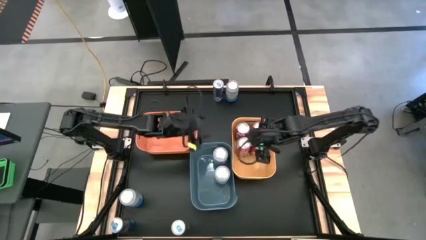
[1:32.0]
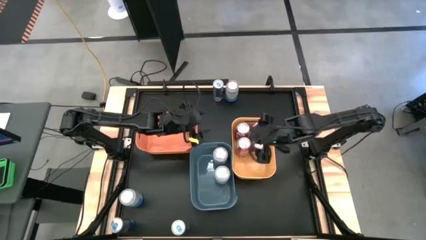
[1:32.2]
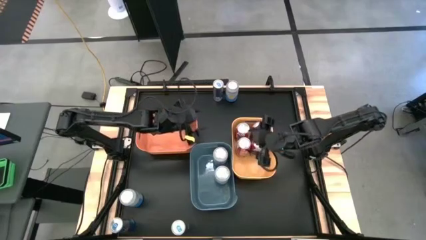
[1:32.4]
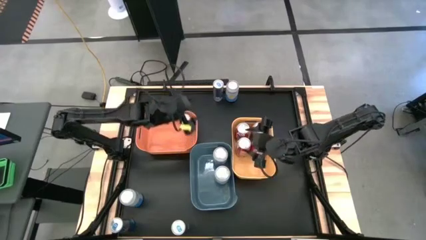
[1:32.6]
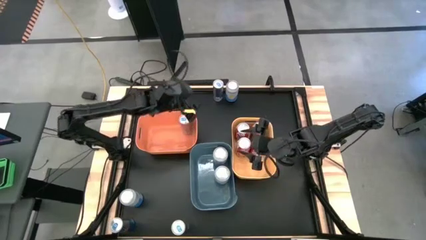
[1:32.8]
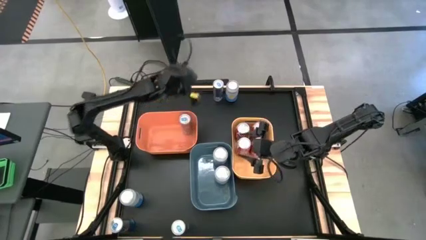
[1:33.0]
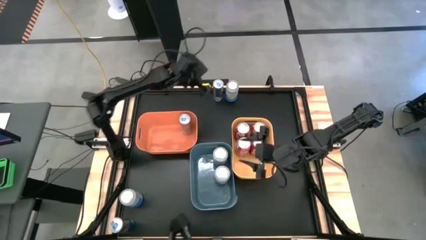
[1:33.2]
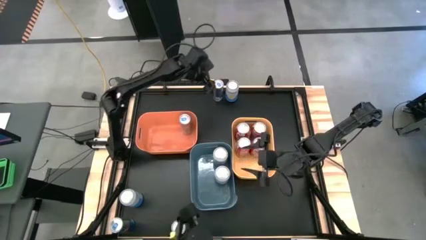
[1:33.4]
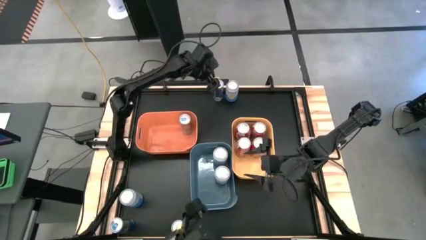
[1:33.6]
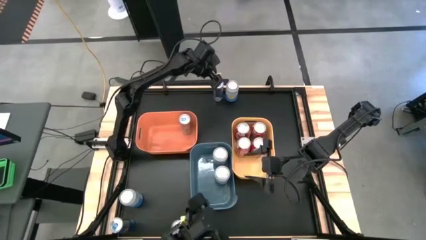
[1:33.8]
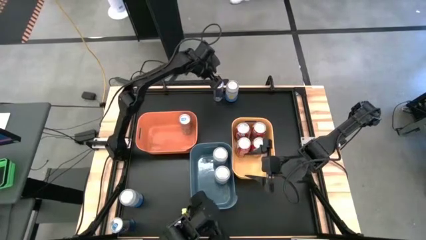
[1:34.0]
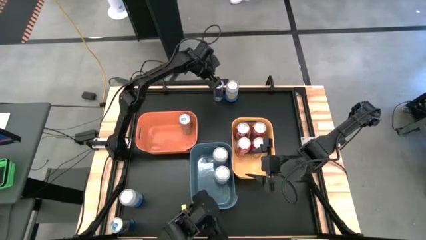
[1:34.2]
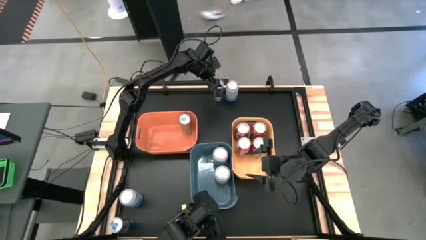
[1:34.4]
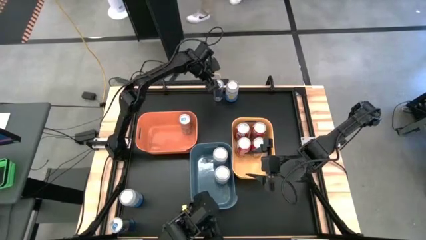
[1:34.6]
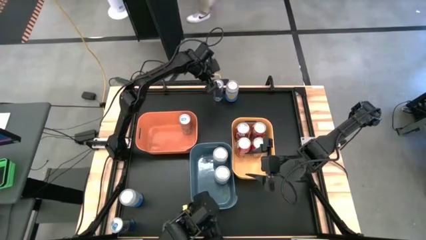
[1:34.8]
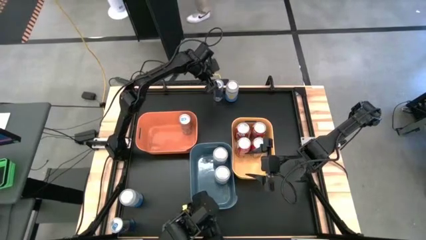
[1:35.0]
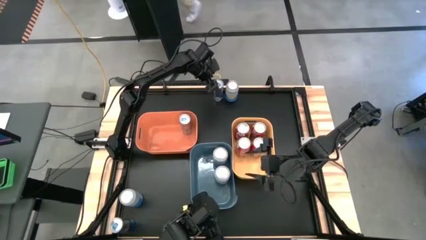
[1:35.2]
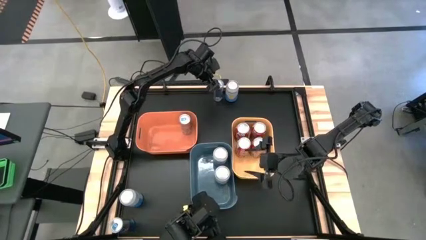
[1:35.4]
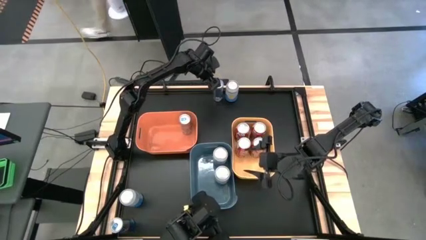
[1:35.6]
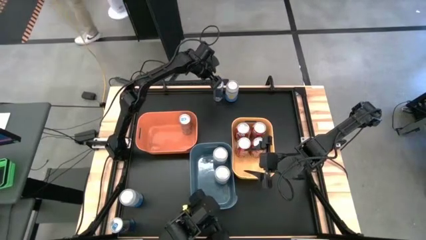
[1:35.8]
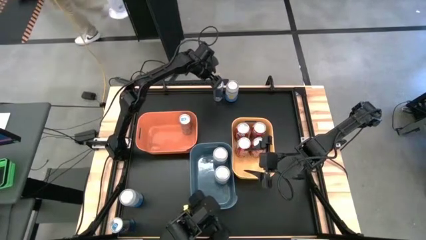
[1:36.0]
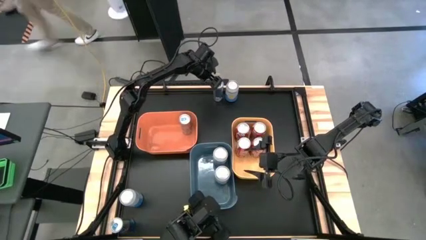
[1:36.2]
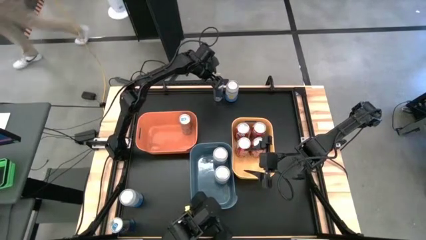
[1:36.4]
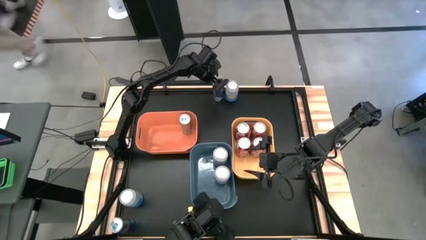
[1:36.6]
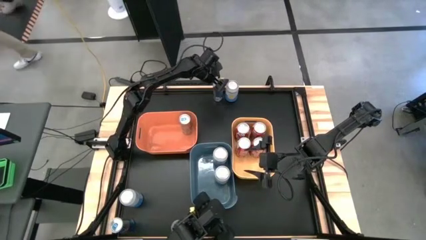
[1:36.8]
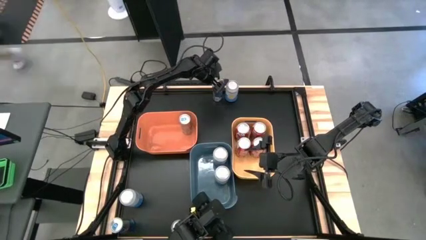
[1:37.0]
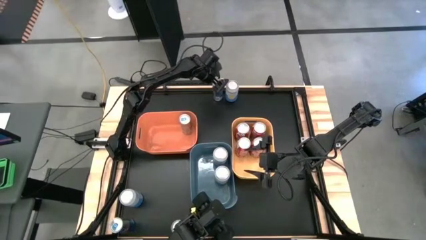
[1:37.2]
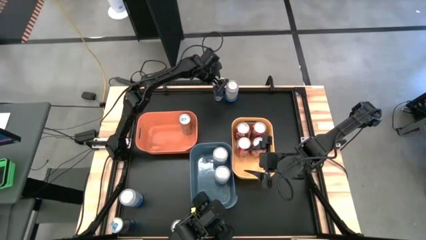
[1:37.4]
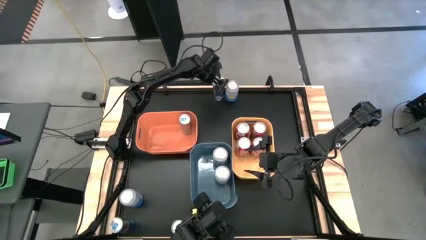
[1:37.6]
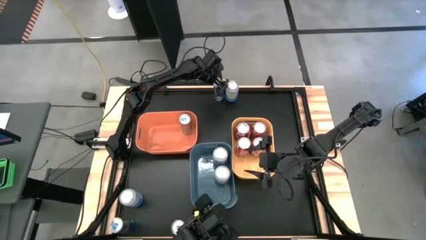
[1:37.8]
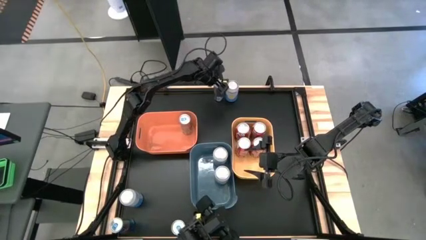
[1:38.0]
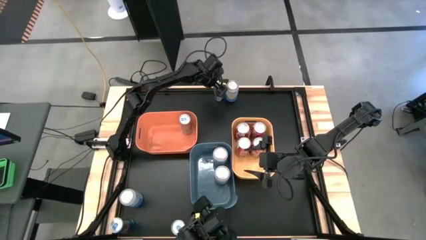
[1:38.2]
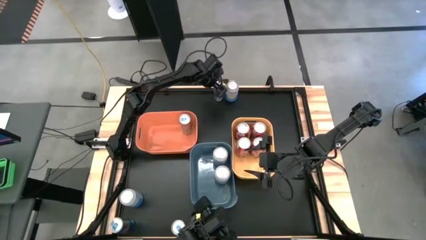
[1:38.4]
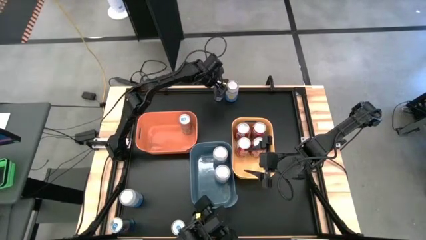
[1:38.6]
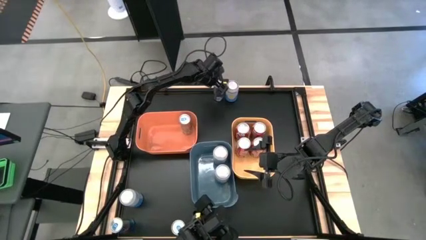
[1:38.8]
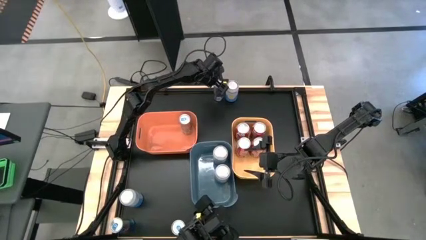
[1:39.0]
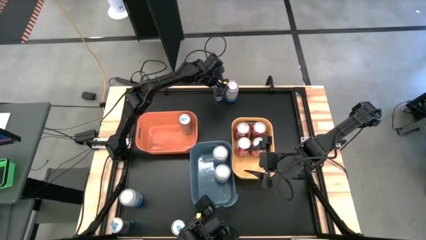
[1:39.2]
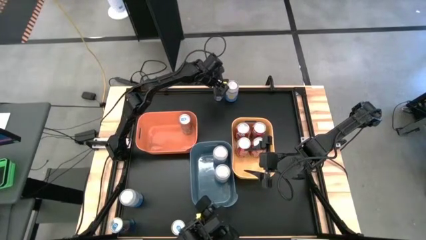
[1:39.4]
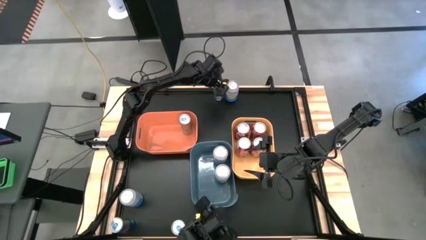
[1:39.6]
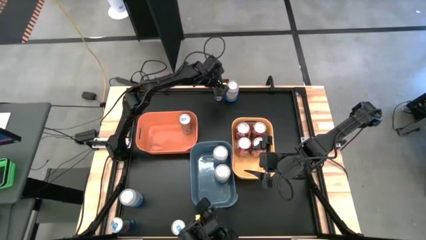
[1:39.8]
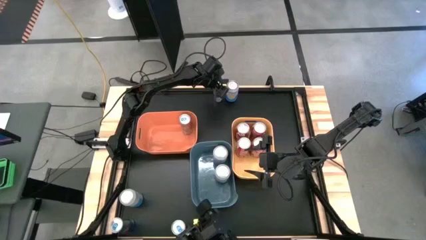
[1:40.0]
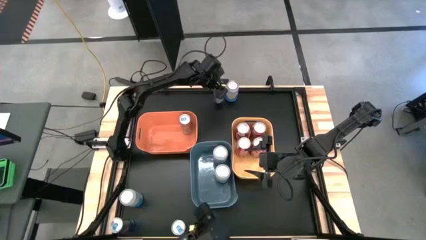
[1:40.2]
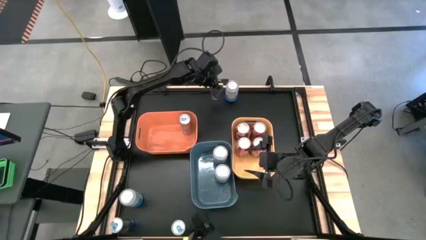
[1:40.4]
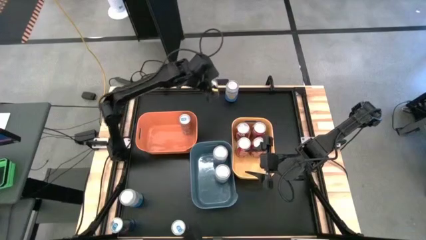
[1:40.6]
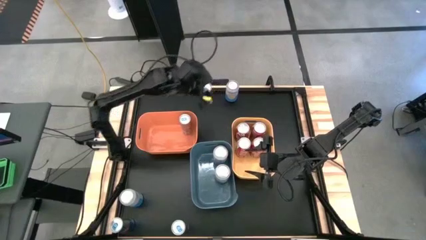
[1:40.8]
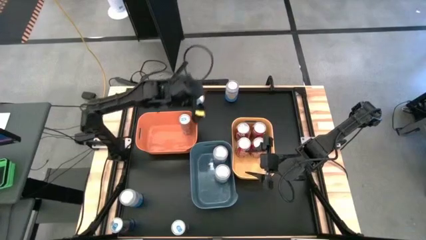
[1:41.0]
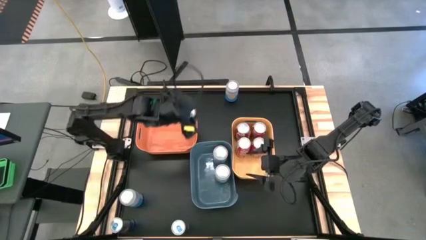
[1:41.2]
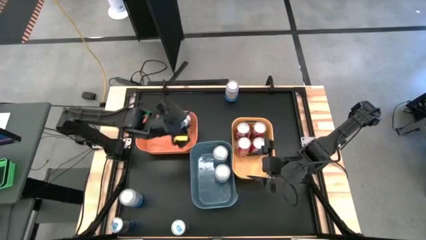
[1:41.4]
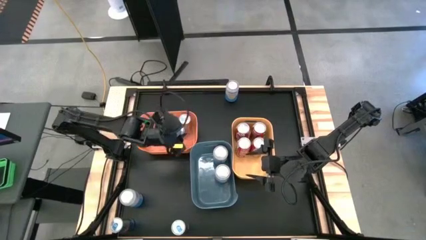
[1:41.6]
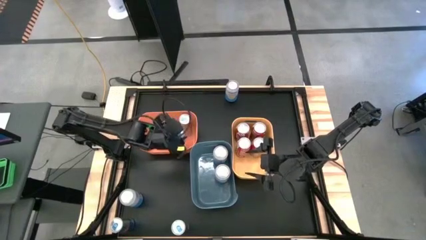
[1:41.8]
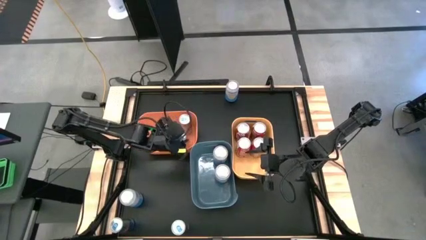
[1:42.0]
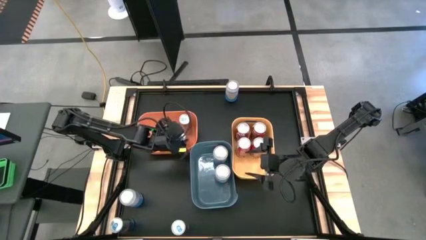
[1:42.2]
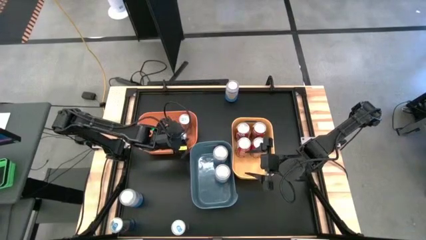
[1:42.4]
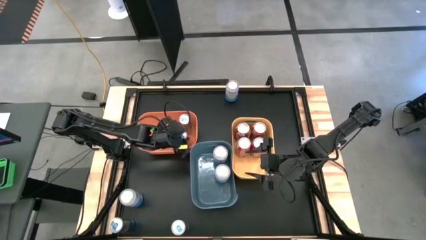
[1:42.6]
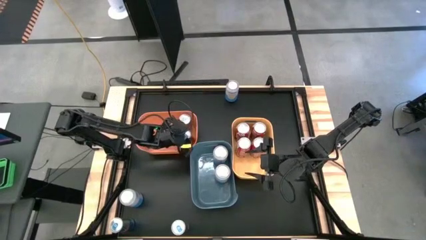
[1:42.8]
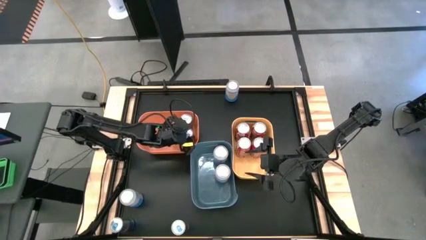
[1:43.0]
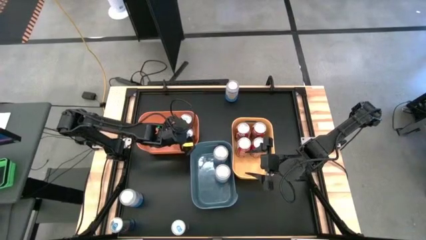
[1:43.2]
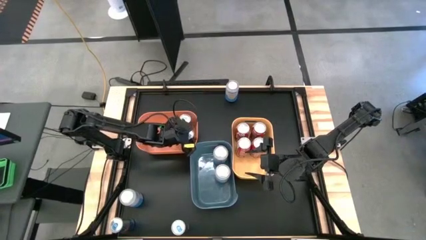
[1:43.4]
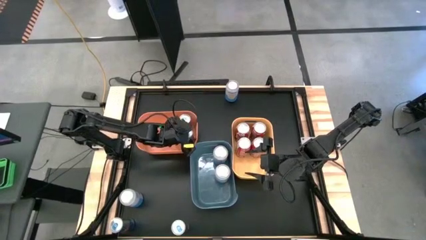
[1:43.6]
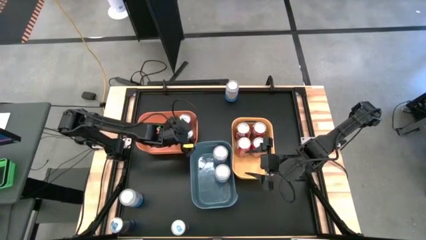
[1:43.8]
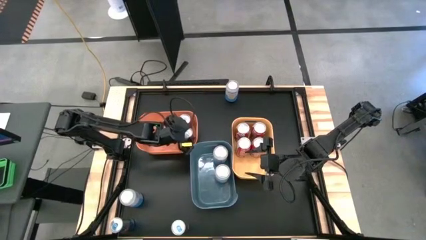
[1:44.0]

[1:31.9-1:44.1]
Task: Sort soda cans
Put the top blue soda can into the orange bin

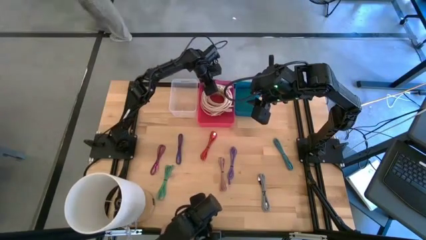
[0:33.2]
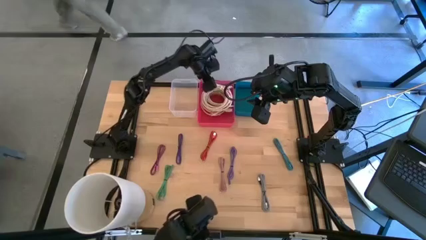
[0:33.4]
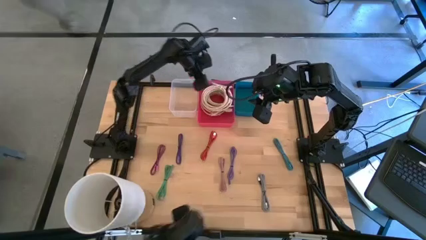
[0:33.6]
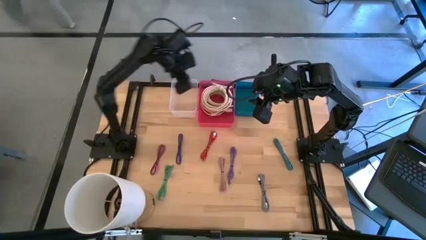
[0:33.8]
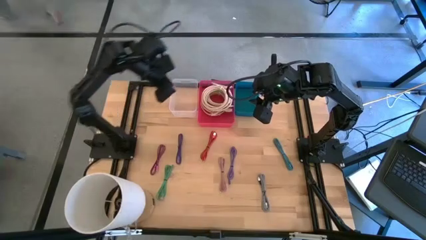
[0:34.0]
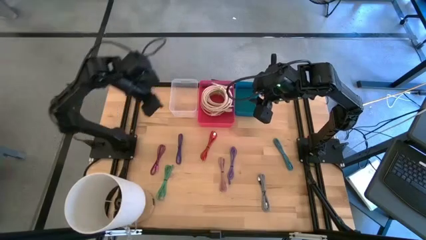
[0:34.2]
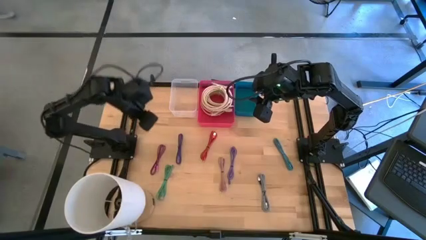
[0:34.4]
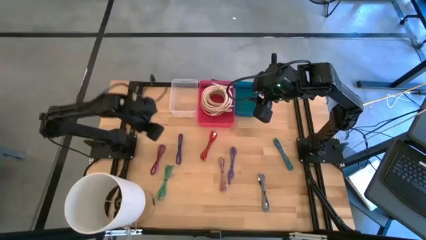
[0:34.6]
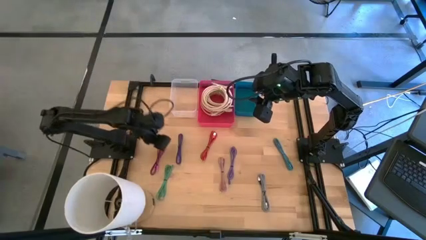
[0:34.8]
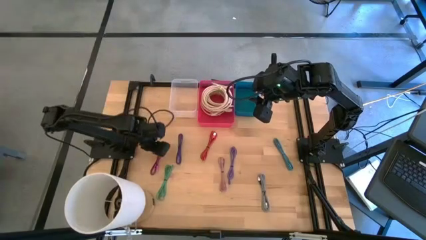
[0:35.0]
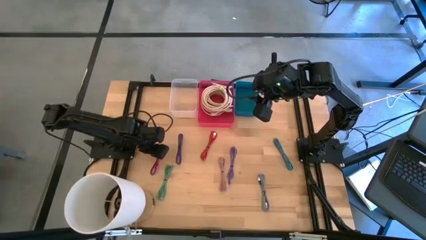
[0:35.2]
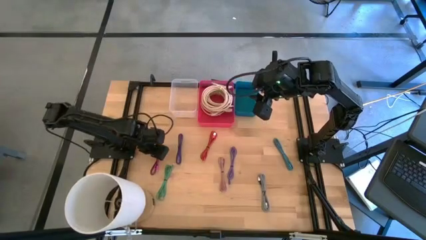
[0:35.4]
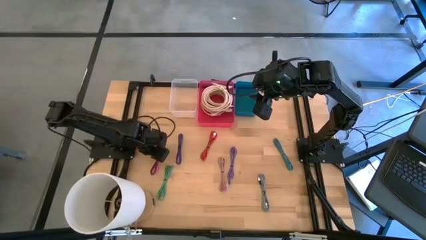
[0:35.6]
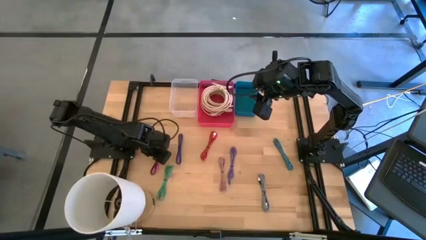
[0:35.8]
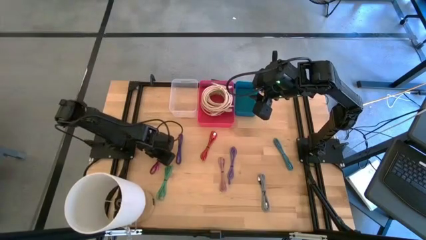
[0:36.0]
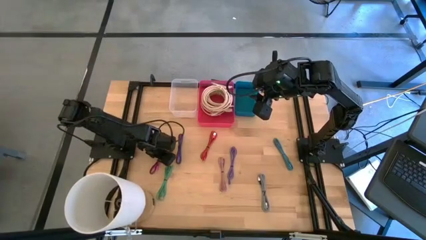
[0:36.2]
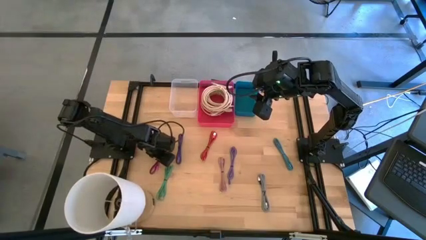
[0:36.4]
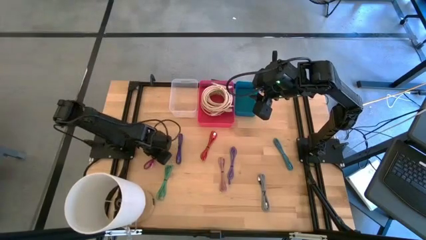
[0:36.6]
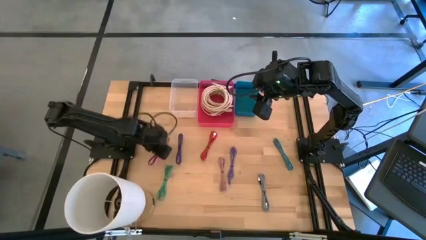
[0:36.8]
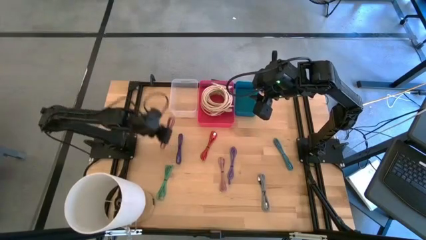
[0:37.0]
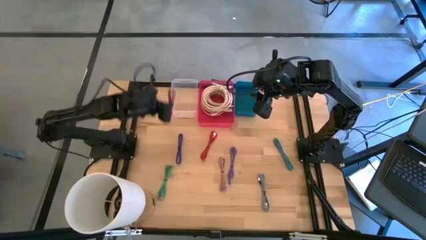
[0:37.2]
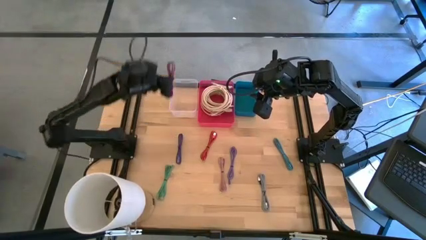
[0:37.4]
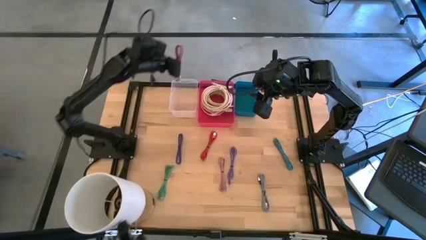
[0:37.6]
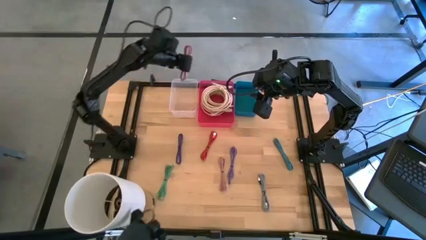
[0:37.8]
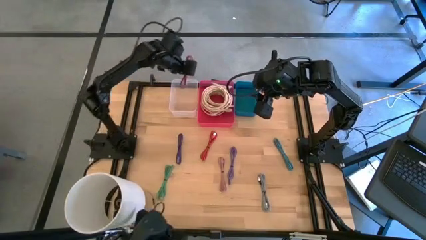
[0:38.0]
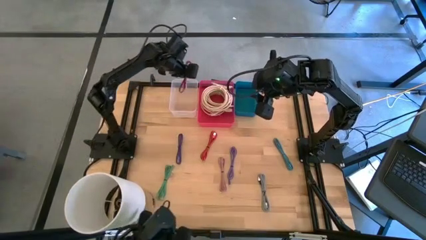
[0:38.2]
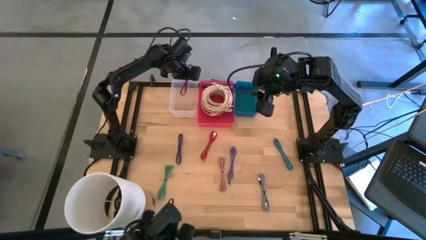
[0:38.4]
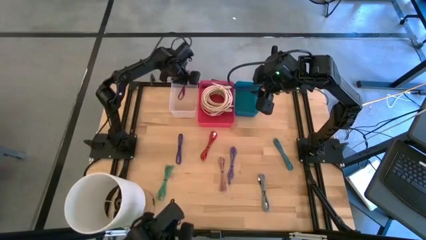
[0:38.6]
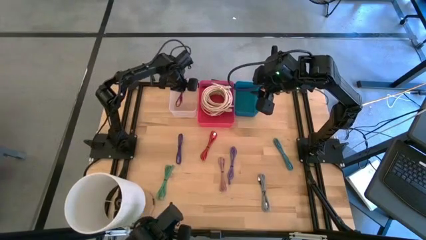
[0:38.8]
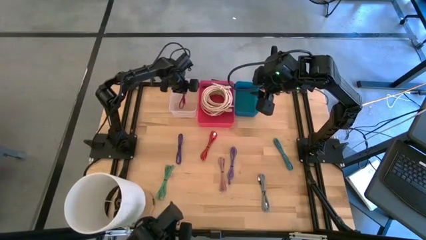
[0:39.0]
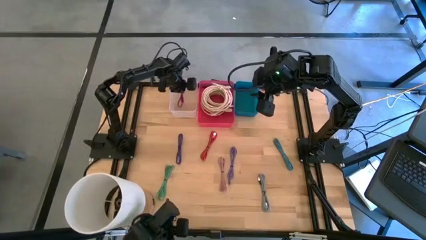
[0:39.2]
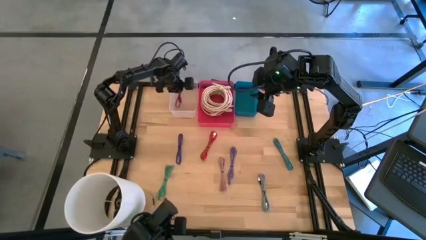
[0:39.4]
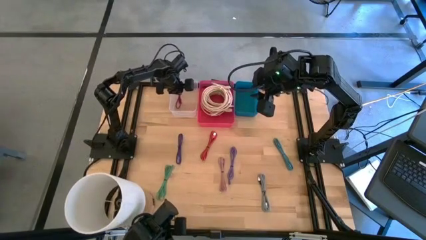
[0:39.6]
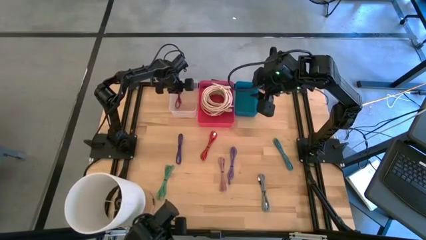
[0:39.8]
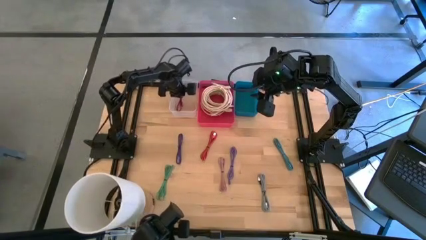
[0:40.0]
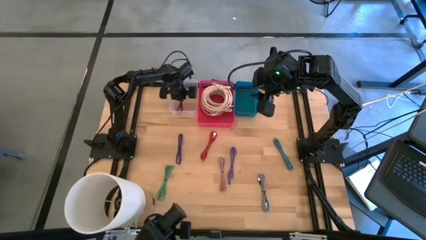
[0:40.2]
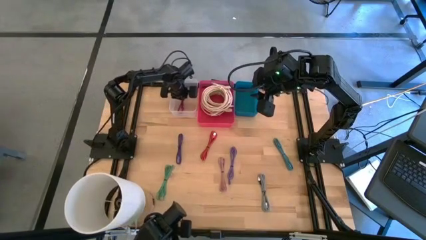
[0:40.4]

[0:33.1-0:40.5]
Task: Pick & Place USB Port
Put the pink charger cable into the transparent bin
